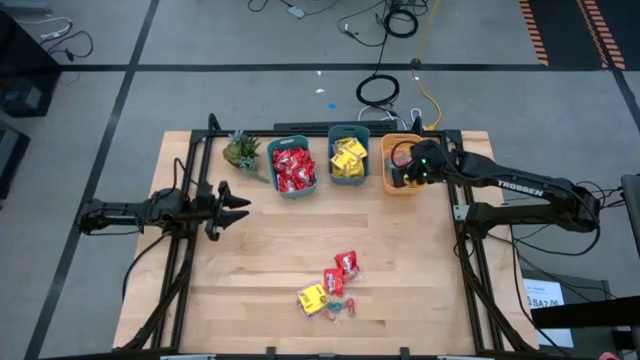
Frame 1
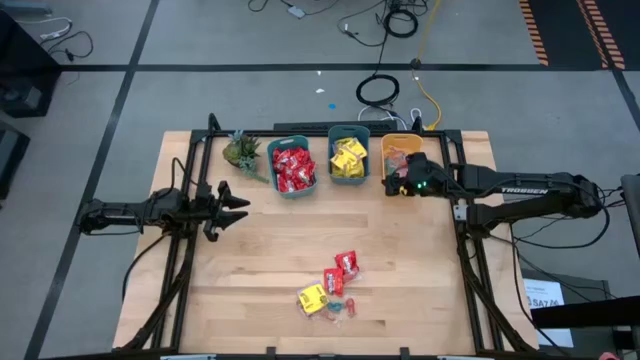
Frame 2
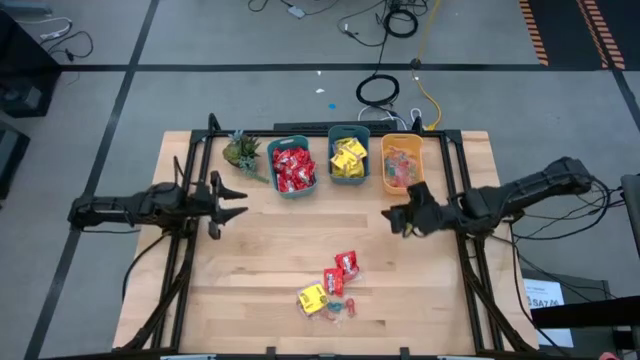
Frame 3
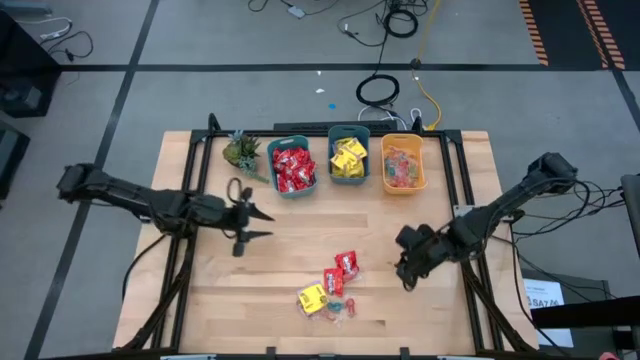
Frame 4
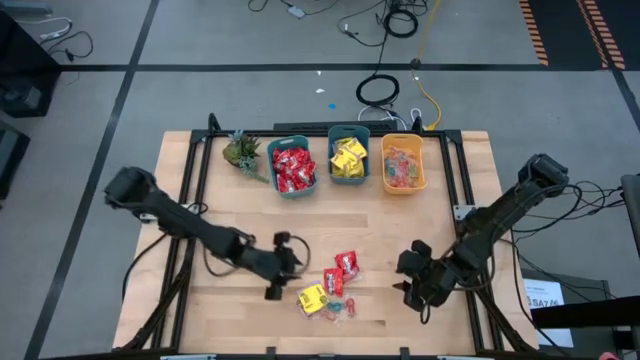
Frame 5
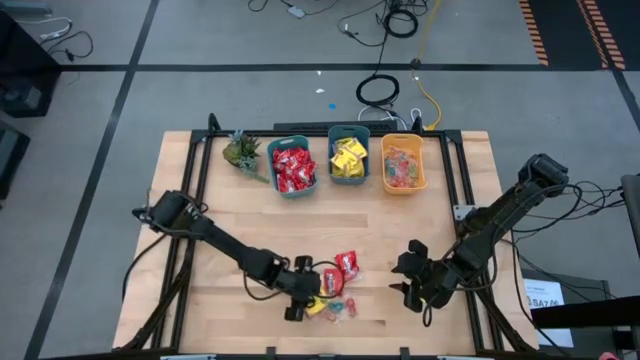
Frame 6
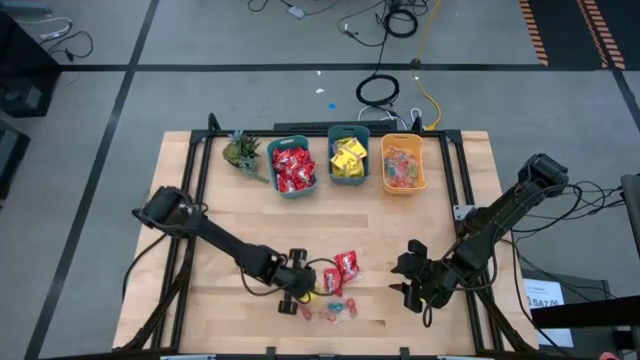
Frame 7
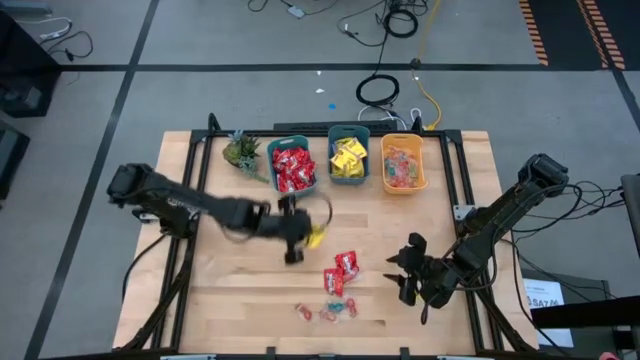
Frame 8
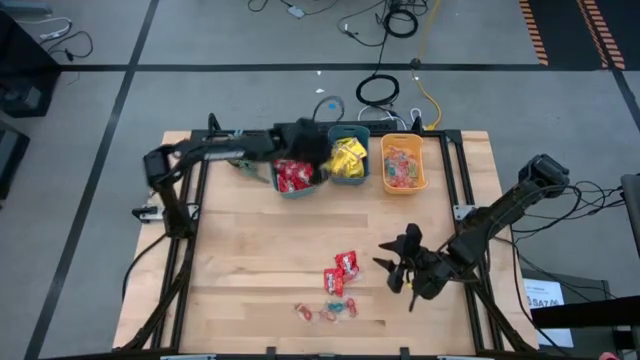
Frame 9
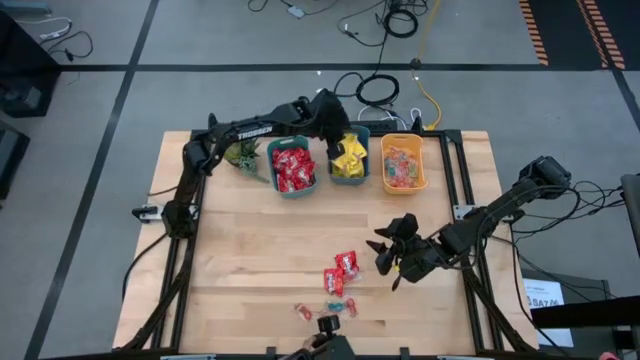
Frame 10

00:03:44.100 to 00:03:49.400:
Task: Sort candy
Put the yellow candy into the blue bin

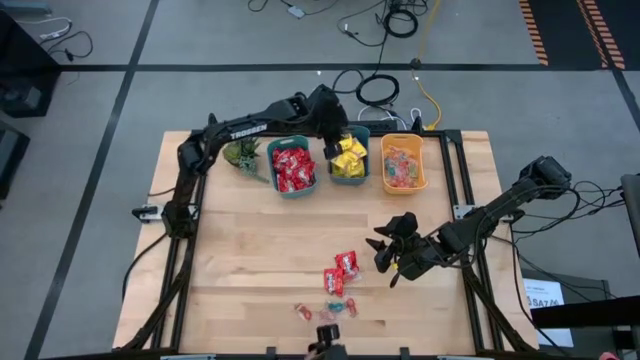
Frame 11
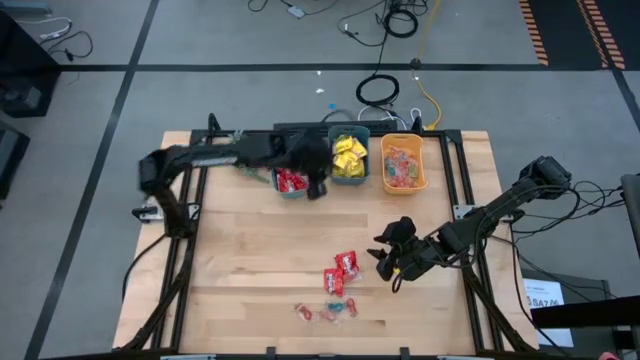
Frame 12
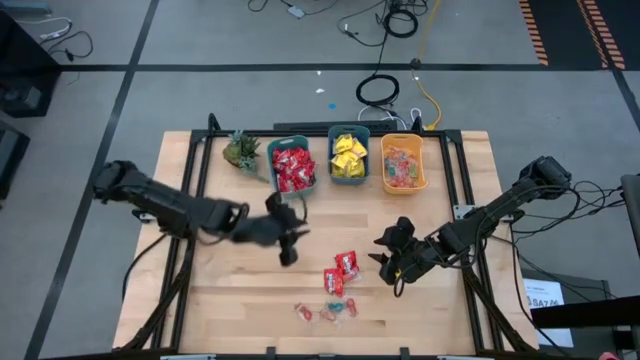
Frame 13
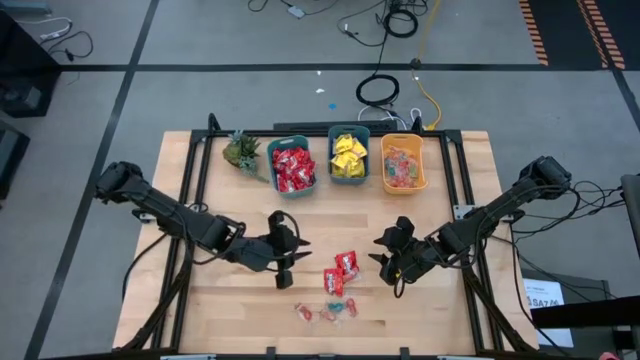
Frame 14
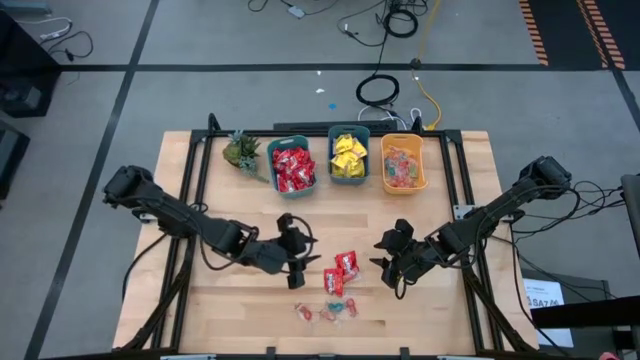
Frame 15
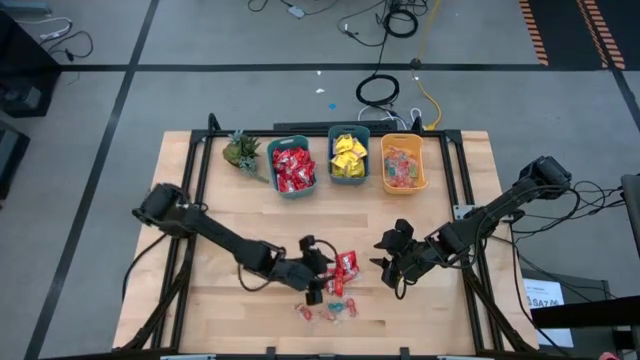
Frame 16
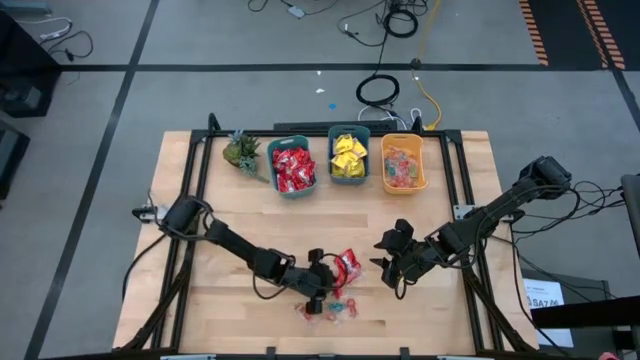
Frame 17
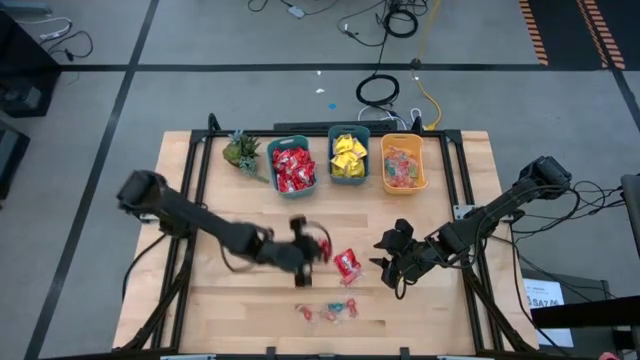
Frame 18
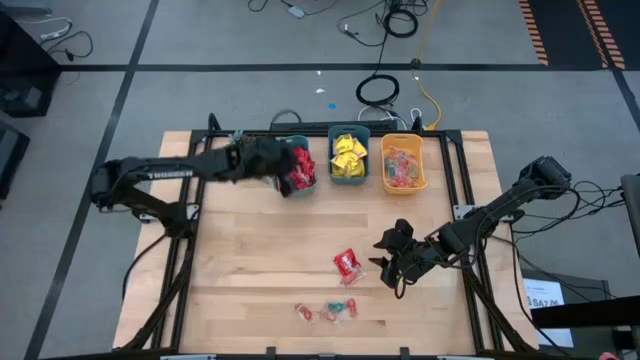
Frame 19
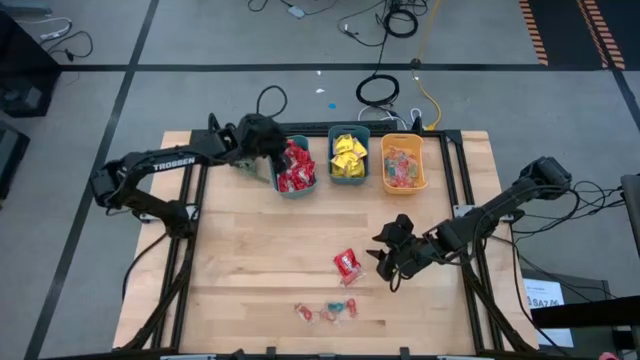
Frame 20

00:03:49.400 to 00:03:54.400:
Put the red candy into the green bin

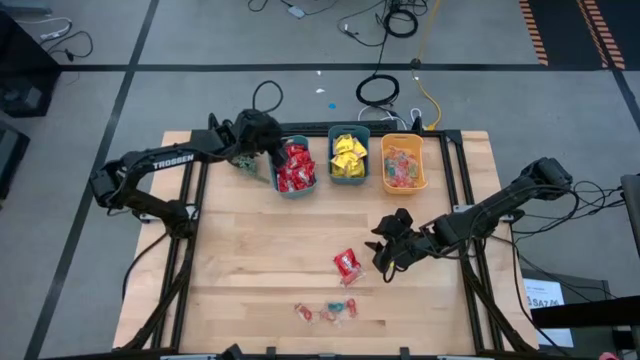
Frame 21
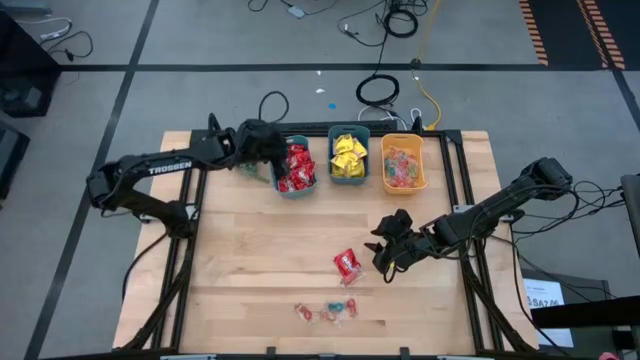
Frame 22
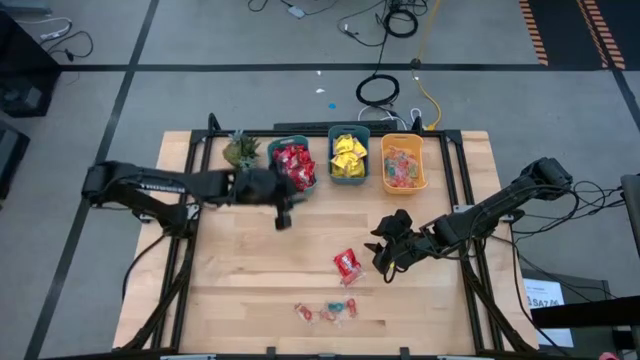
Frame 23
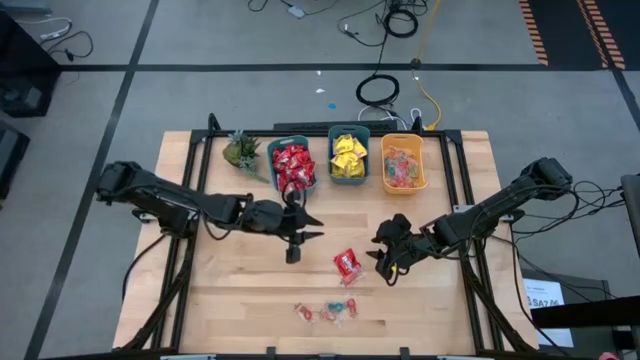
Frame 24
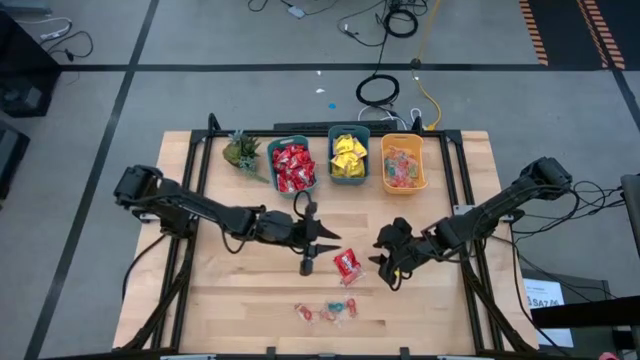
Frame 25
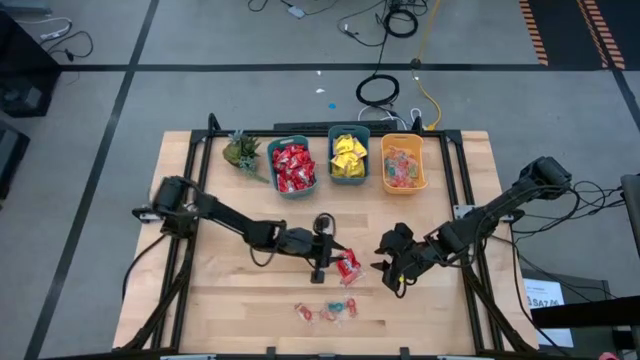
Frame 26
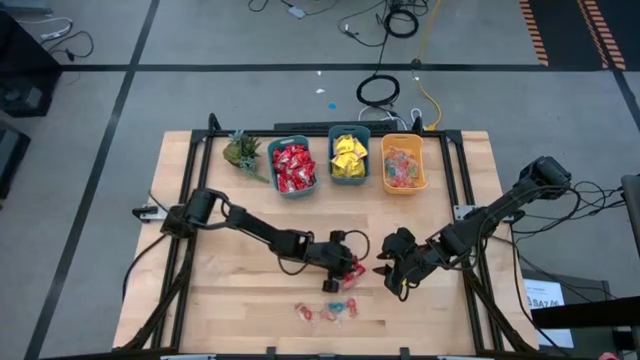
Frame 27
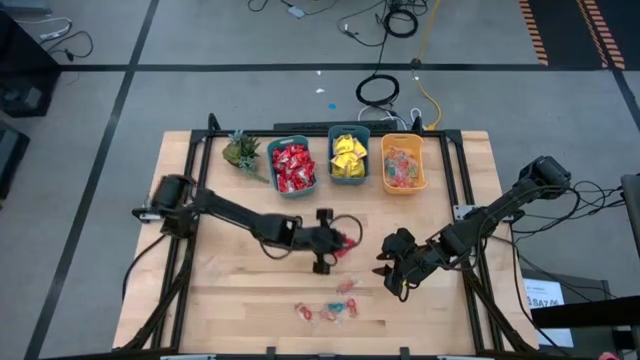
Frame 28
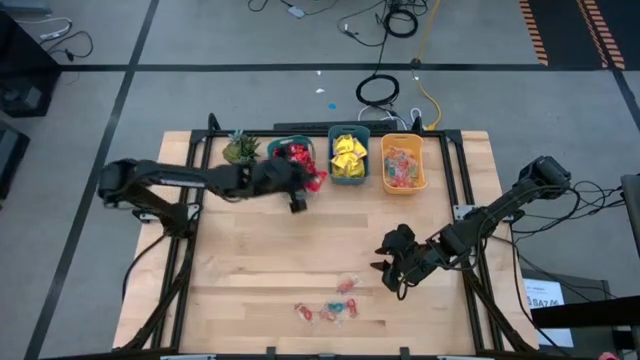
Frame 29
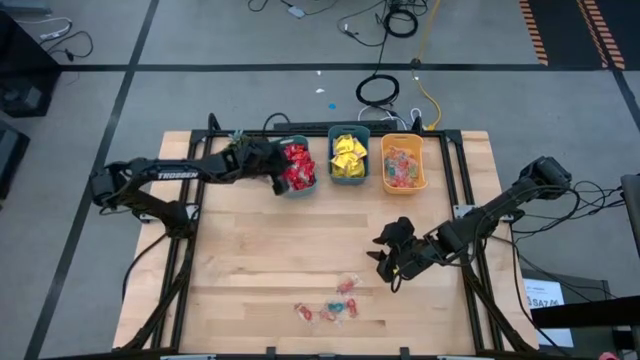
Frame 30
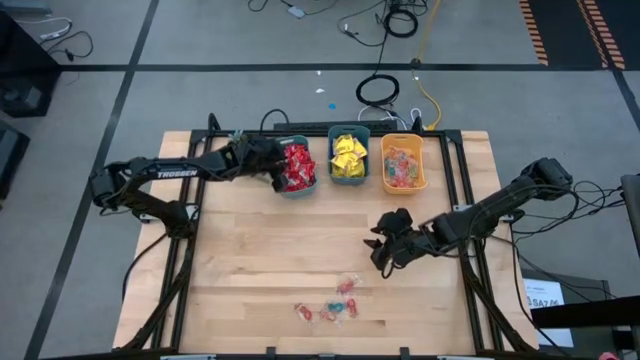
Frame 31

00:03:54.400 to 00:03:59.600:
Put the red candy into the green bin

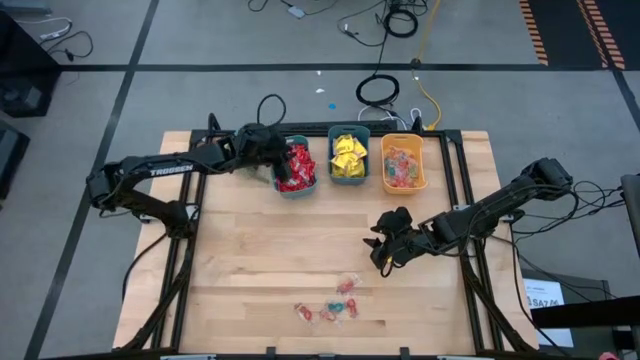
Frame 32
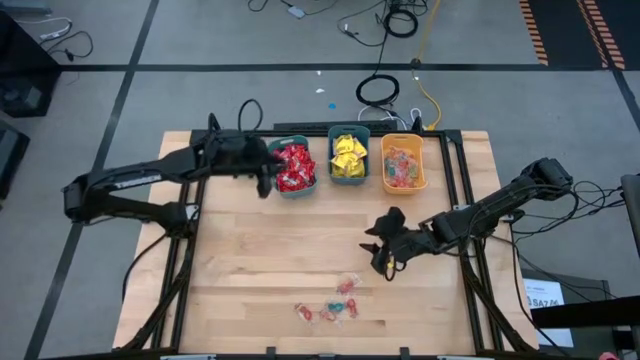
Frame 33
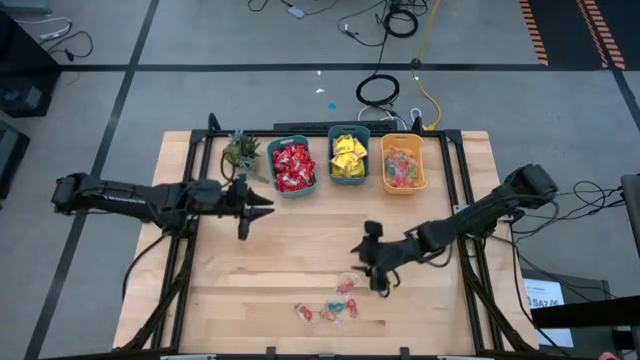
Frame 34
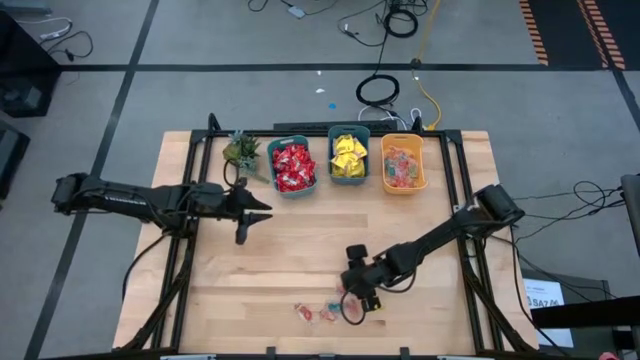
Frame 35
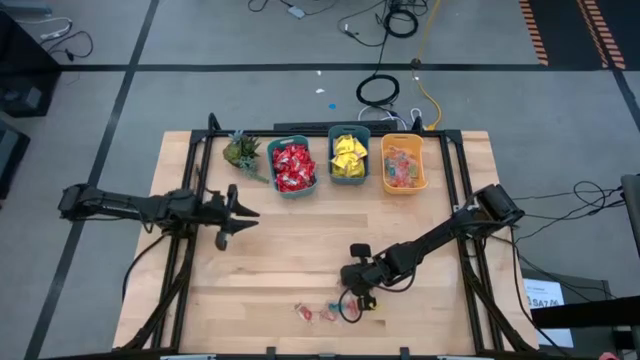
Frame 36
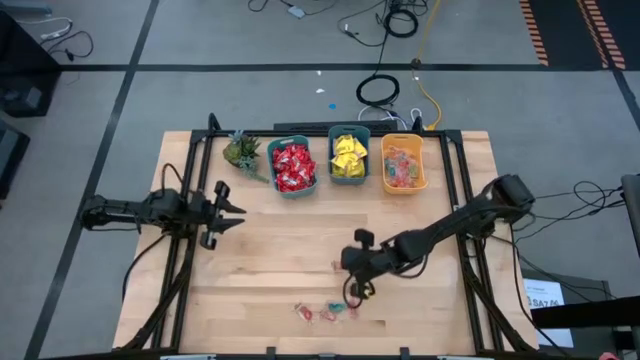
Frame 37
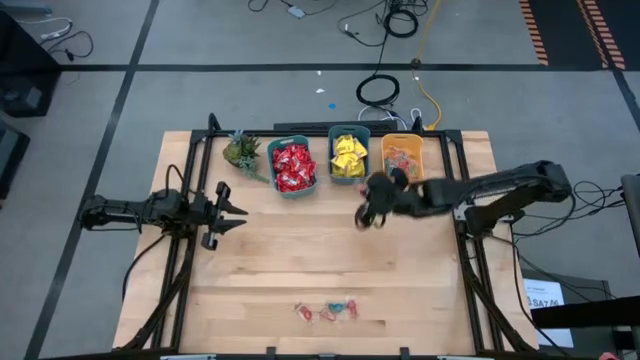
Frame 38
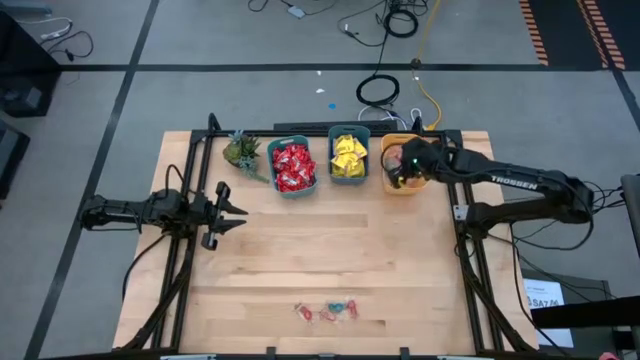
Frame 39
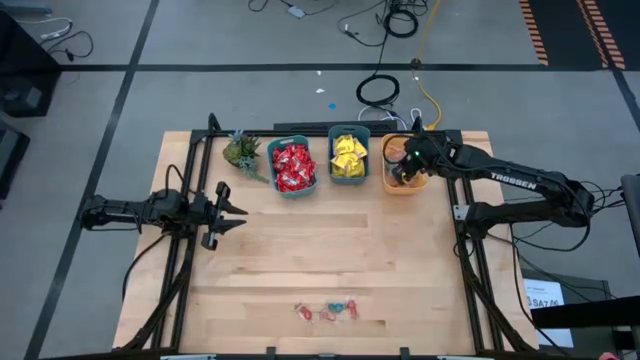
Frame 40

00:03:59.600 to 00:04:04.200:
Put the red gummy candy into the yellow bin

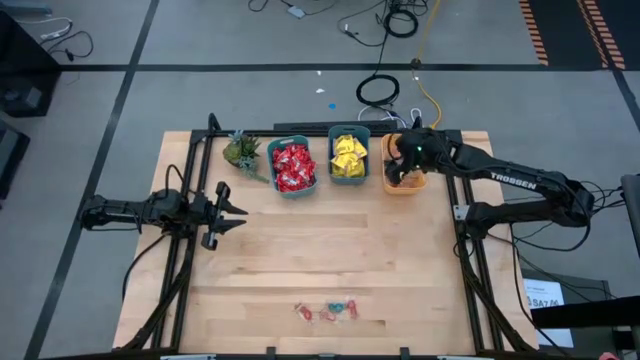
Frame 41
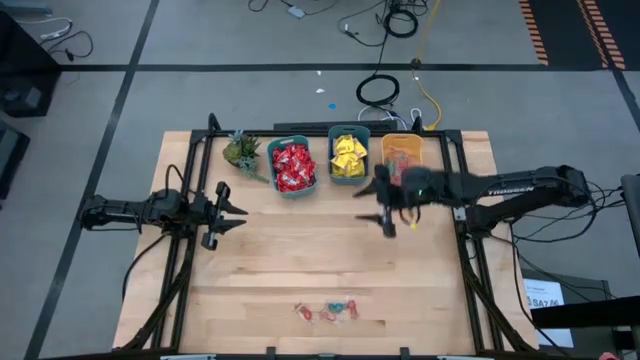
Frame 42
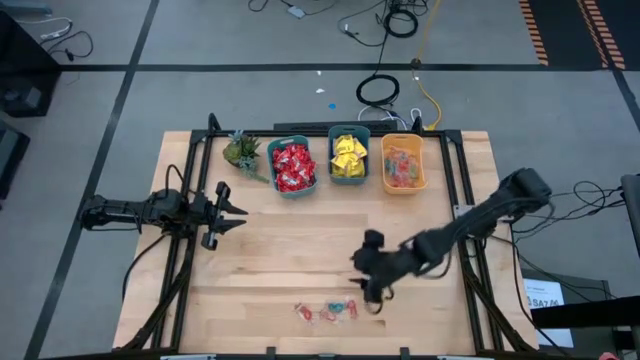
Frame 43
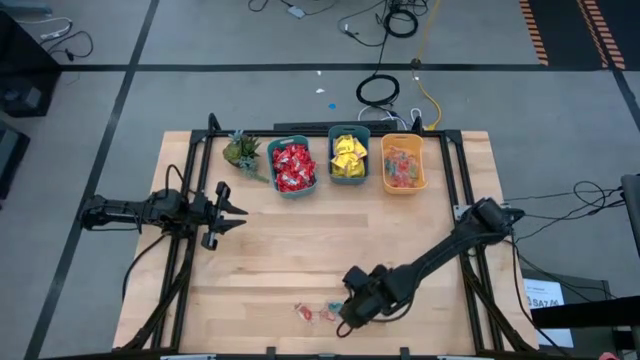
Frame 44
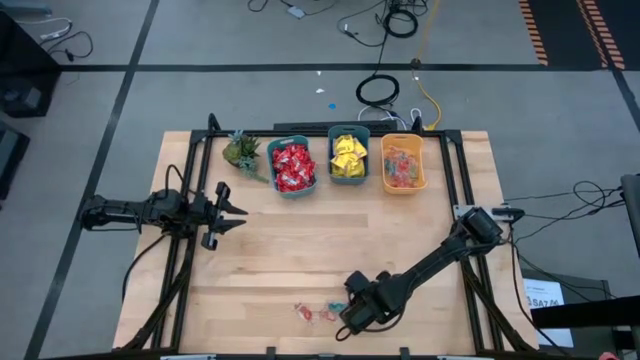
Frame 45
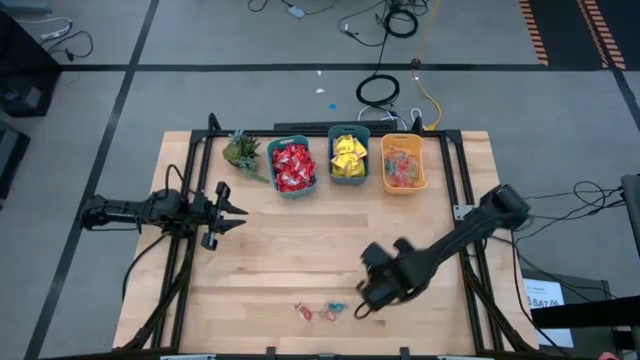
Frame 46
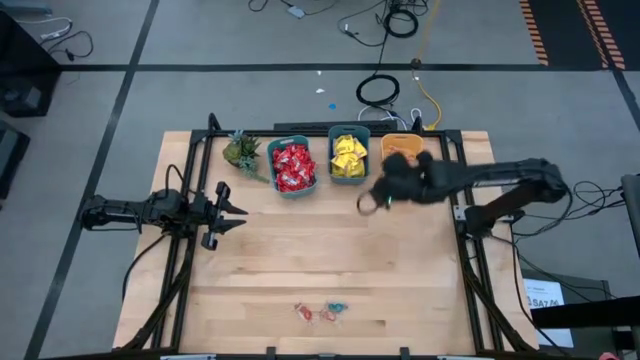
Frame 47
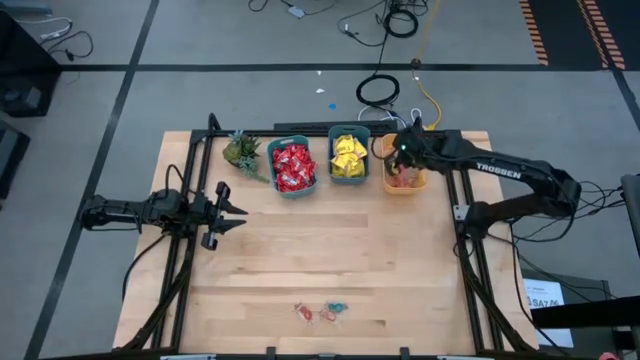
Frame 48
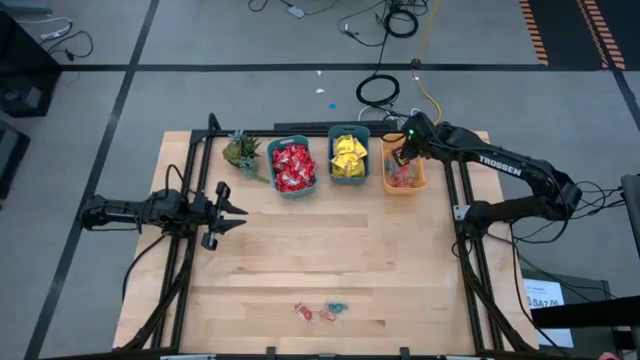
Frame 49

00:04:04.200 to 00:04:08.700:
Put the red gummy candy into the yellow bin
